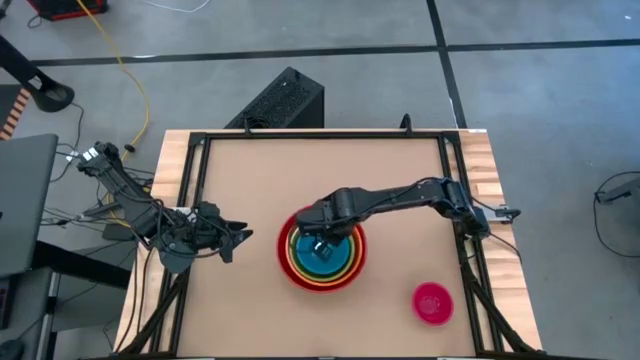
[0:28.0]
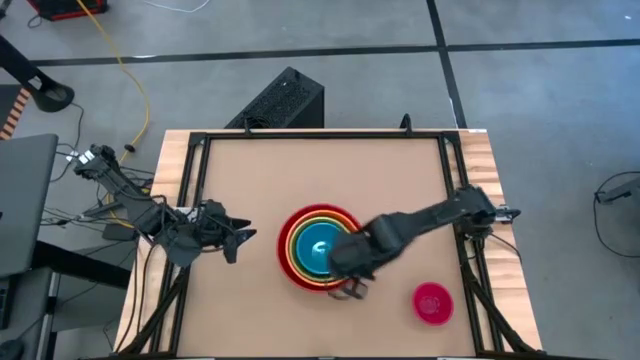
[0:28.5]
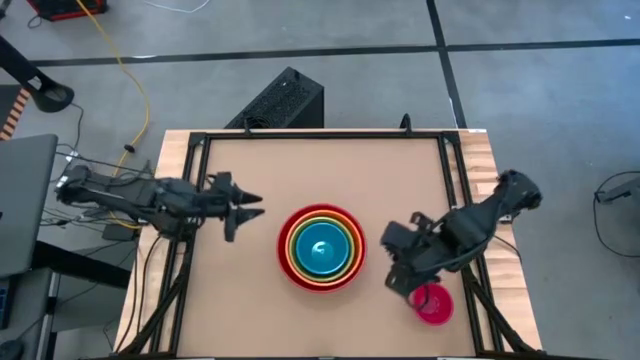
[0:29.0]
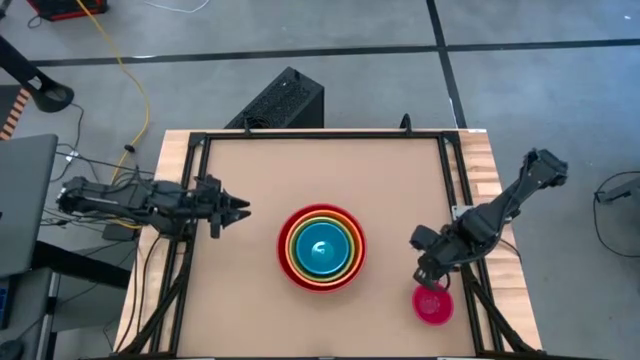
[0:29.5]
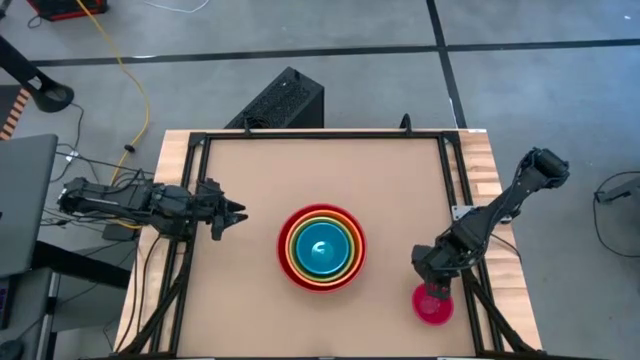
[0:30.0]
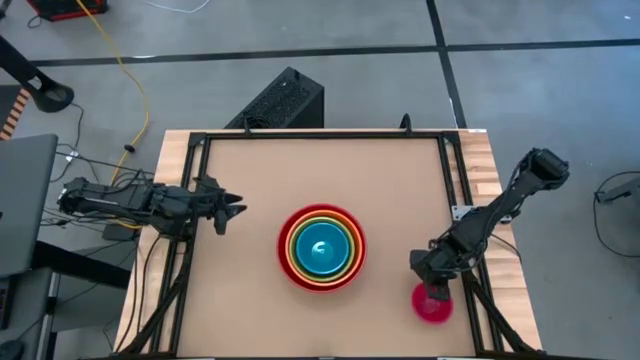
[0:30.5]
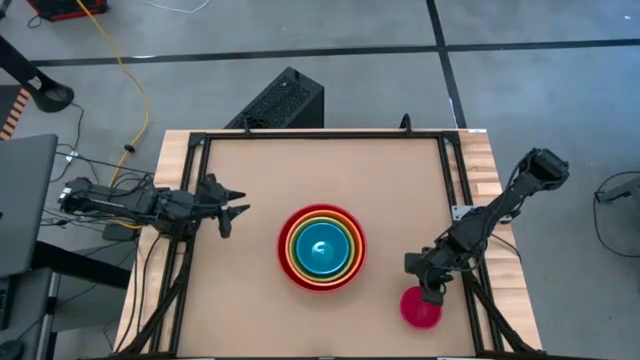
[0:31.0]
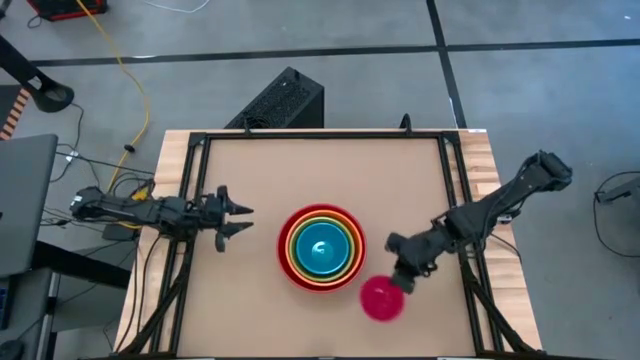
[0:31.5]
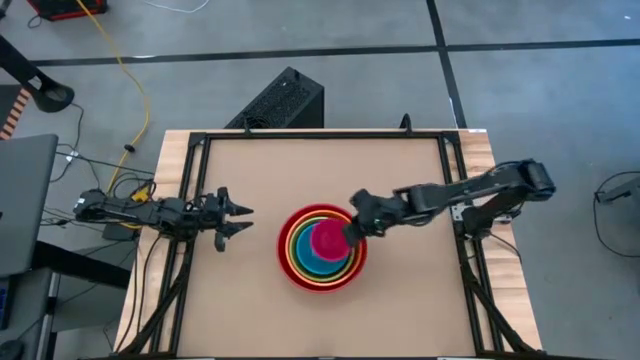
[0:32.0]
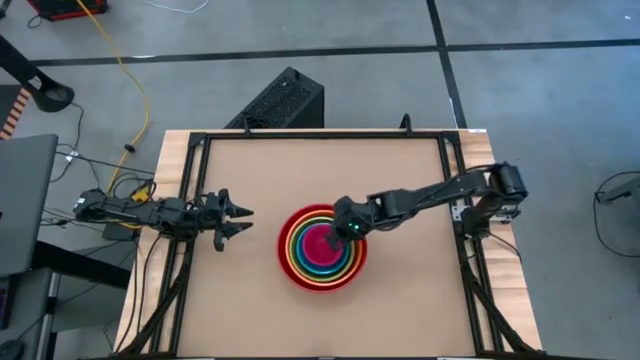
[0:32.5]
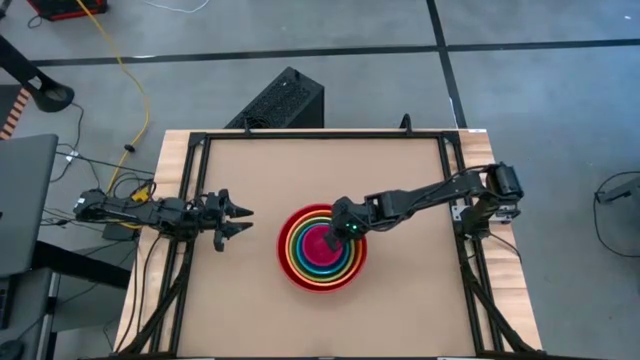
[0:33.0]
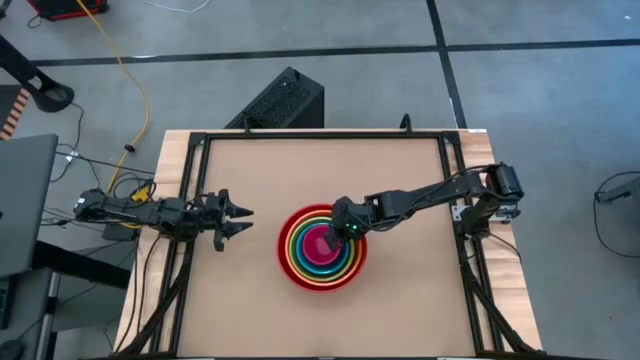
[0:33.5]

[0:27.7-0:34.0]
Stack the pink bowl on top of the blue bowl

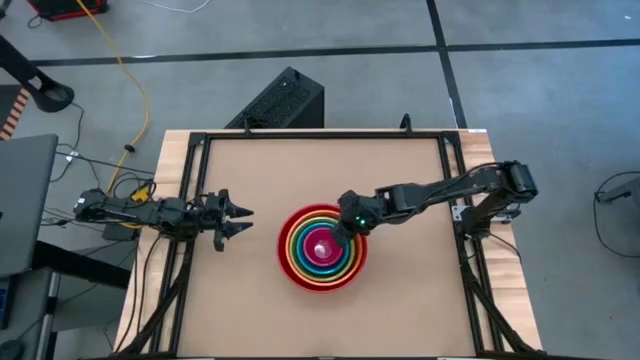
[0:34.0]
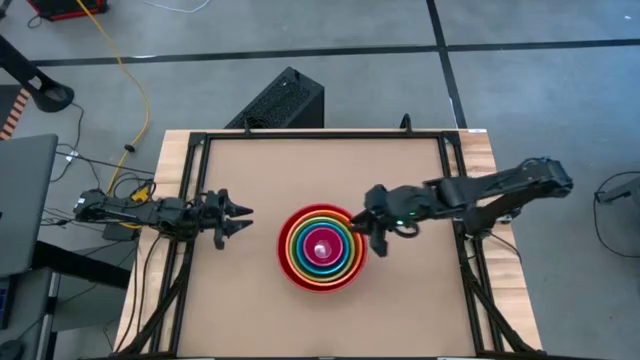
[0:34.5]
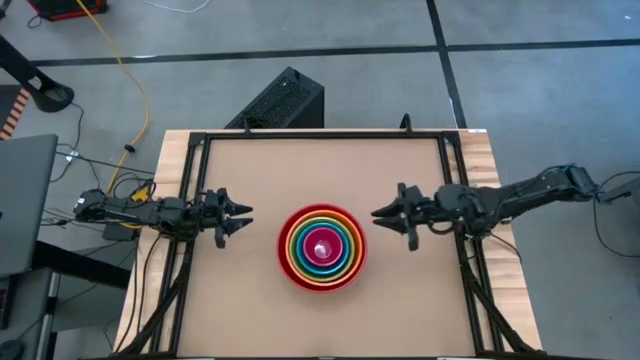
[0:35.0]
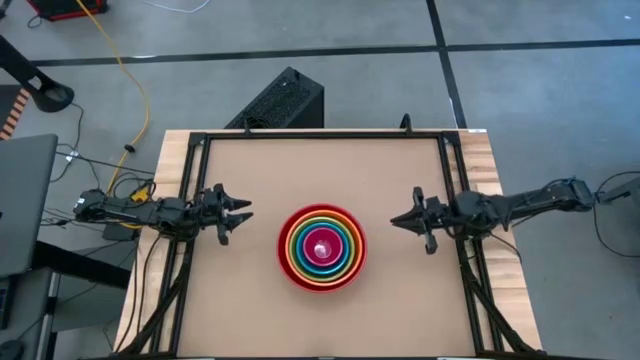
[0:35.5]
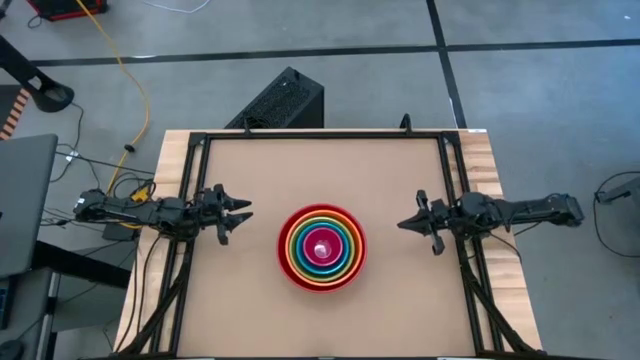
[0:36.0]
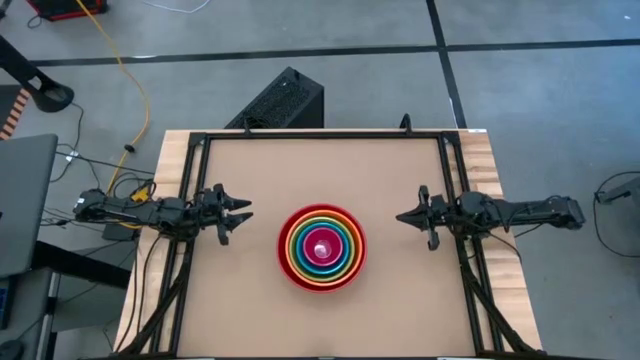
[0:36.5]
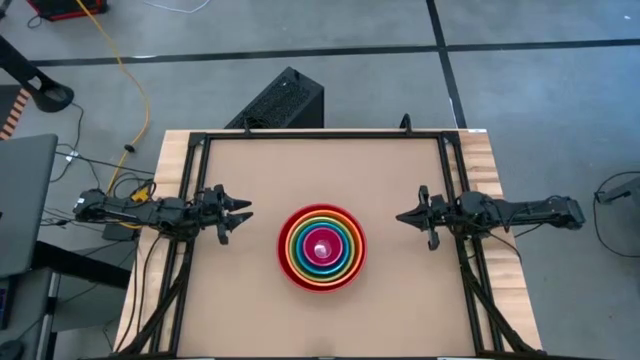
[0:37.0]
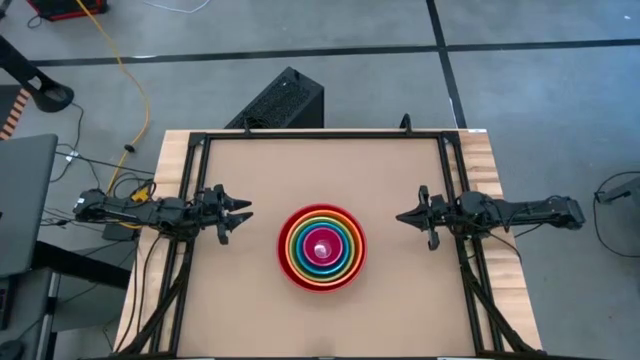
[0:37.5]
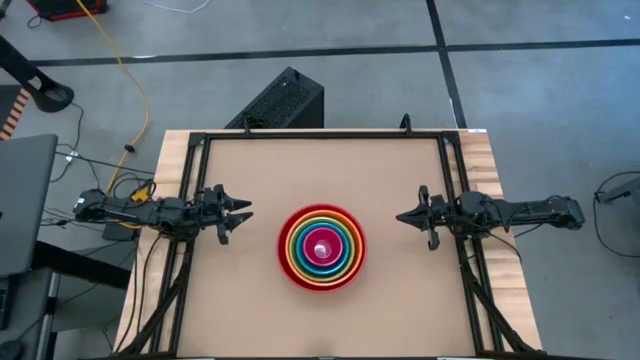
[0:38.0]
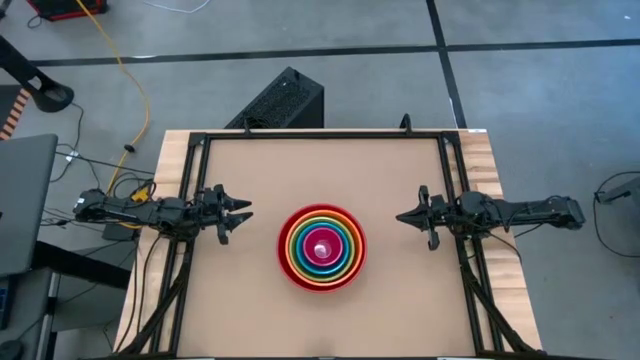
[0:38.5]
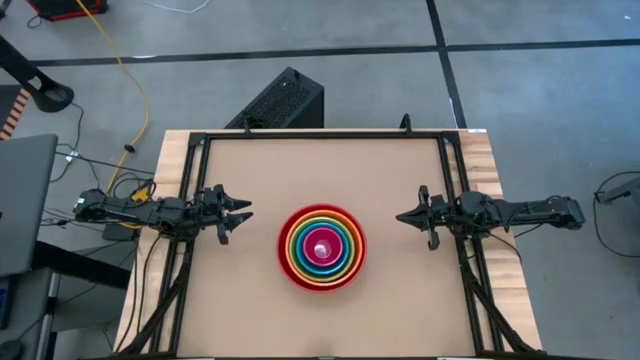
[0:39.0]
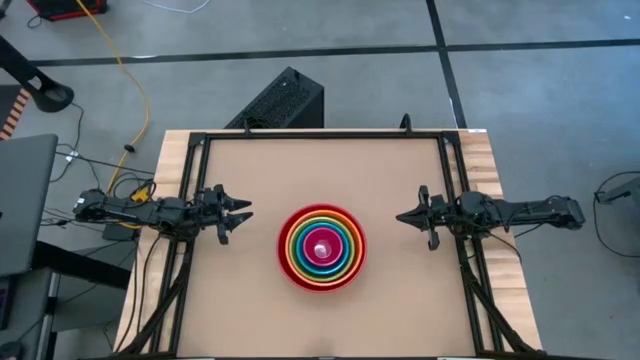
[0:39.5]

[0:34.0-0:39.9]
Return to Home Position
